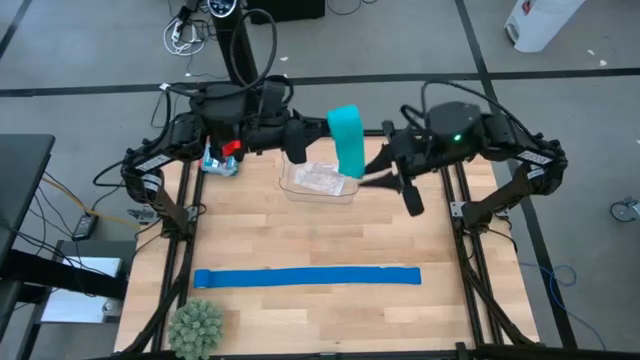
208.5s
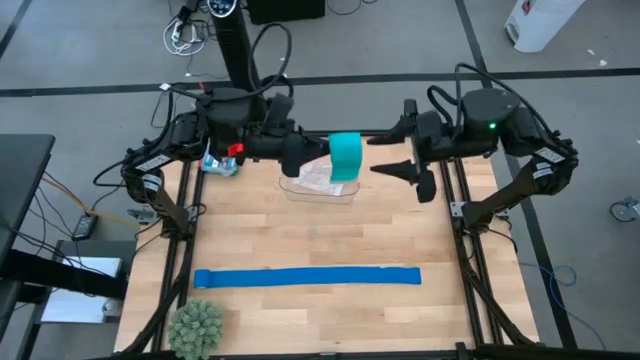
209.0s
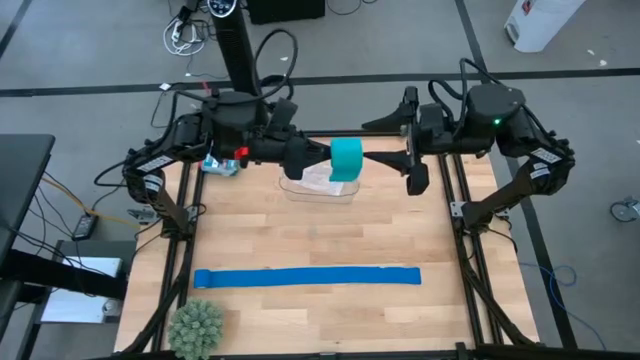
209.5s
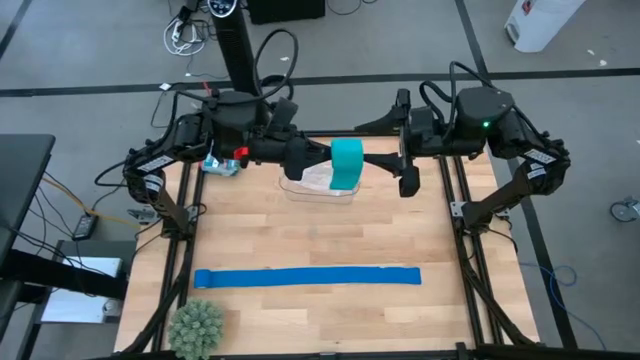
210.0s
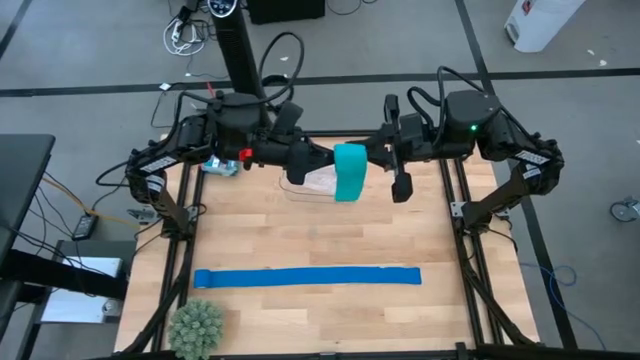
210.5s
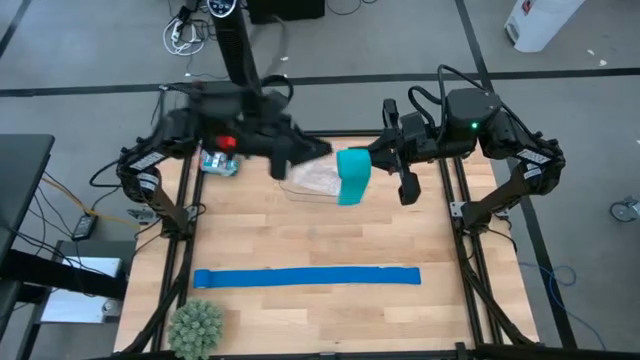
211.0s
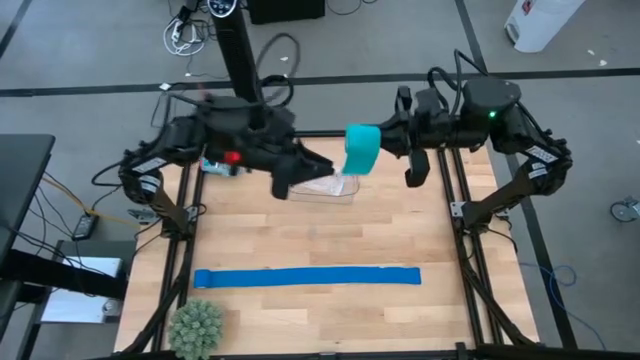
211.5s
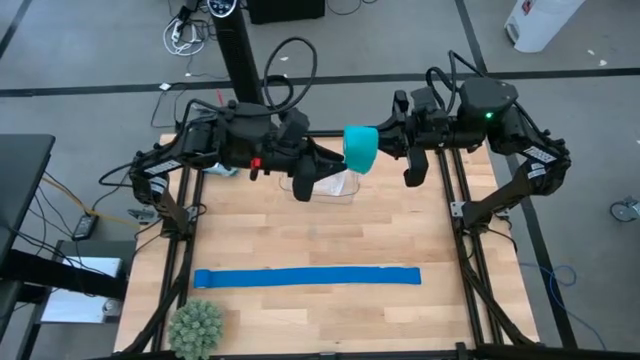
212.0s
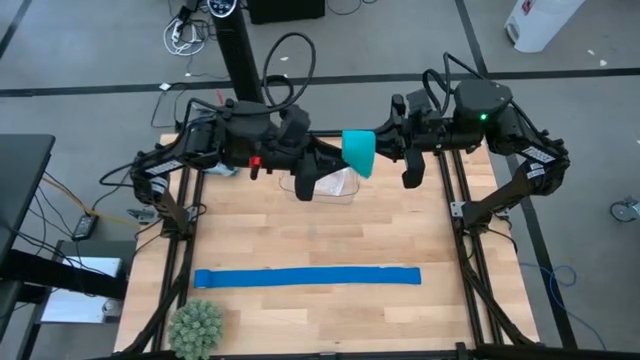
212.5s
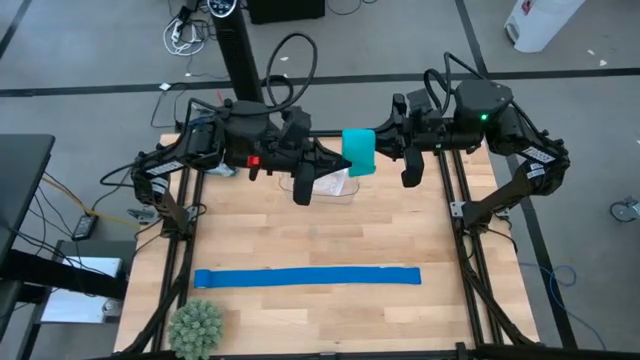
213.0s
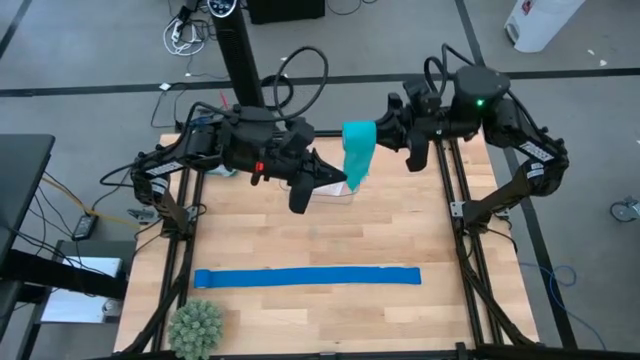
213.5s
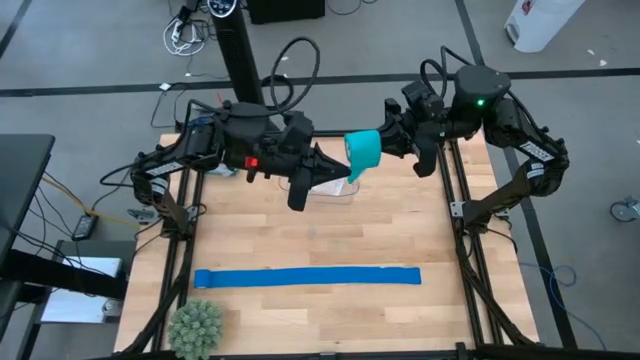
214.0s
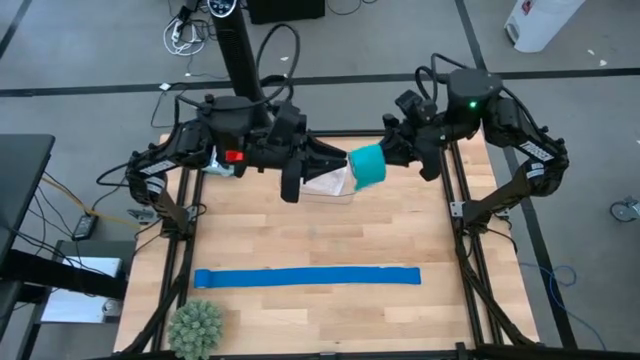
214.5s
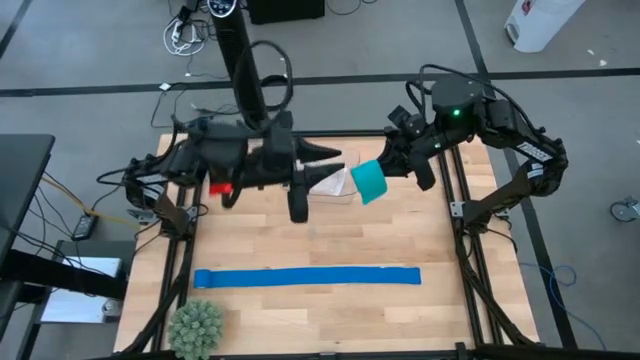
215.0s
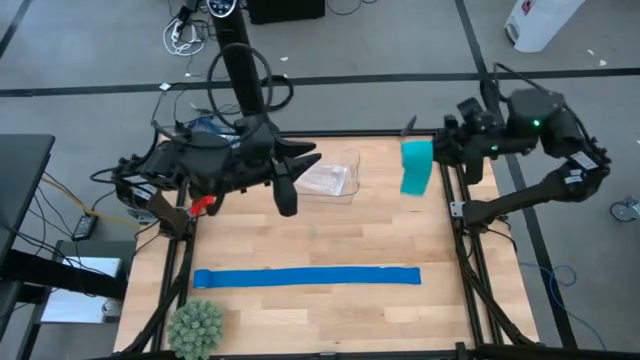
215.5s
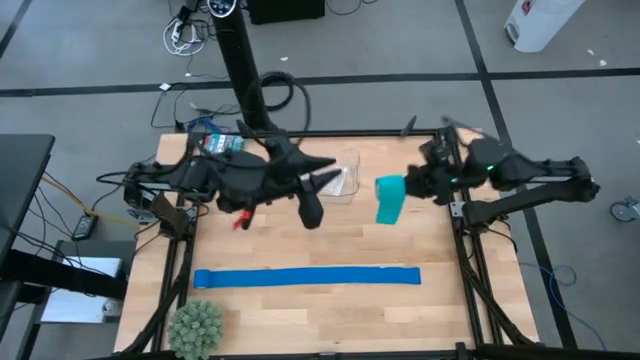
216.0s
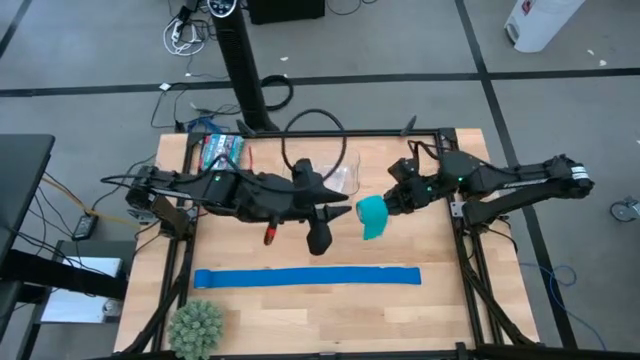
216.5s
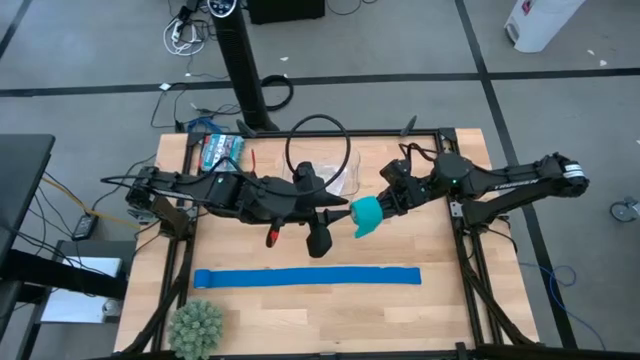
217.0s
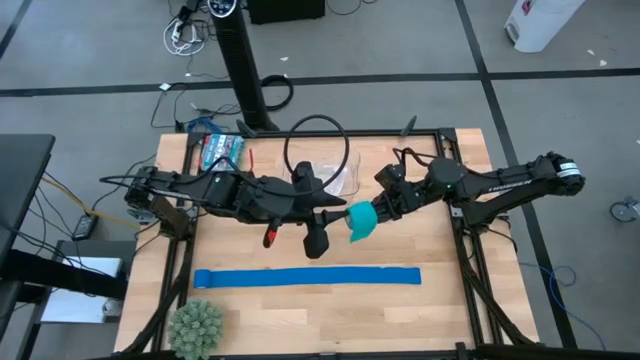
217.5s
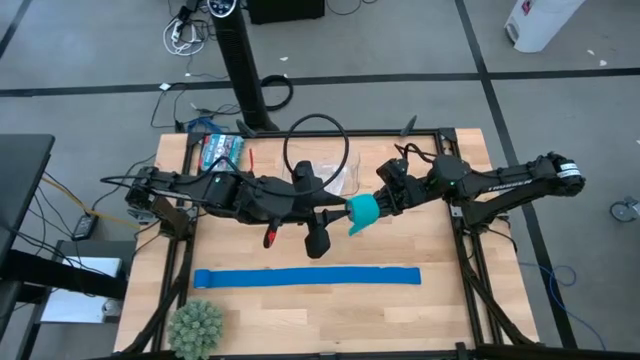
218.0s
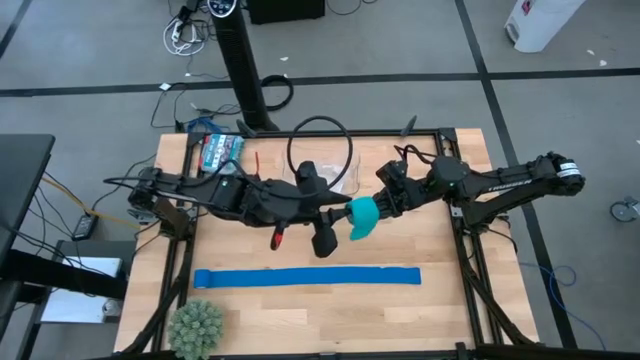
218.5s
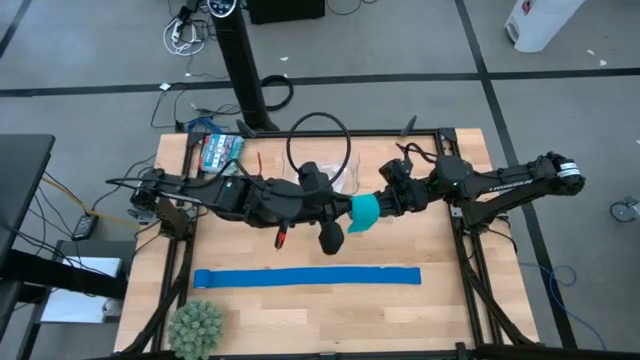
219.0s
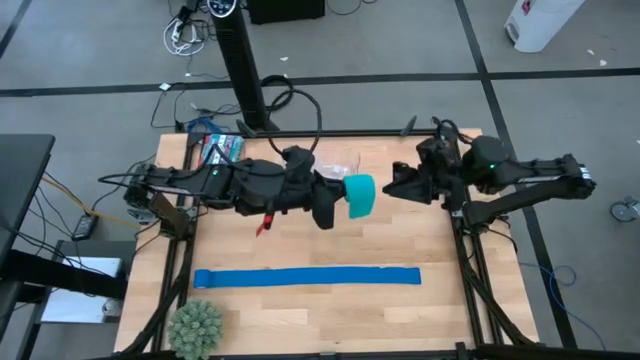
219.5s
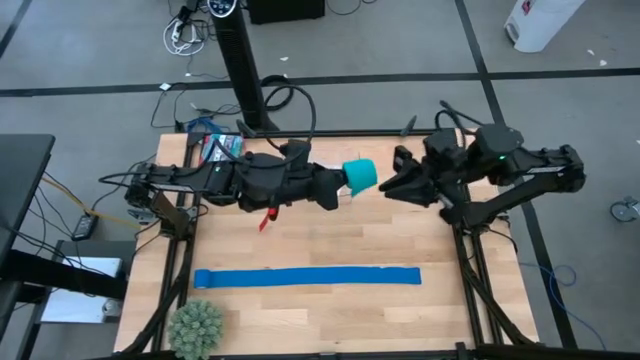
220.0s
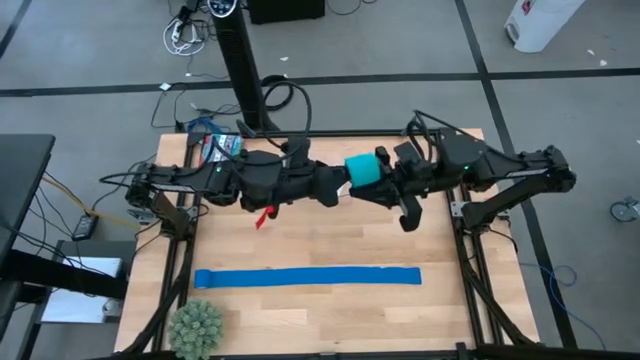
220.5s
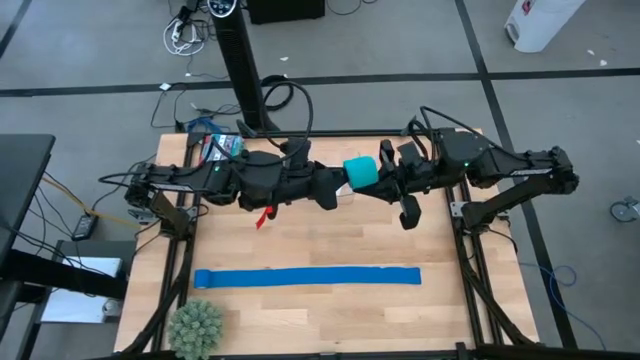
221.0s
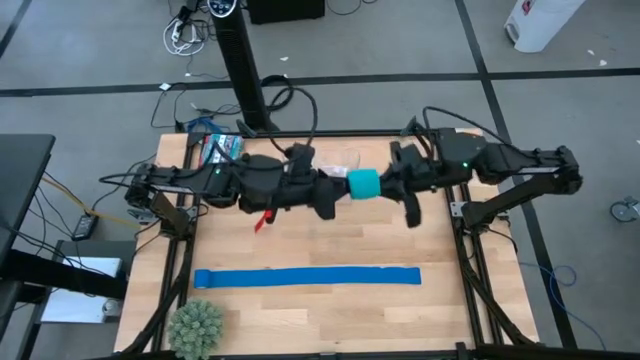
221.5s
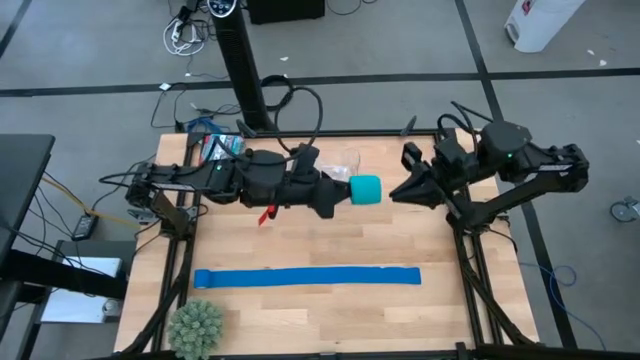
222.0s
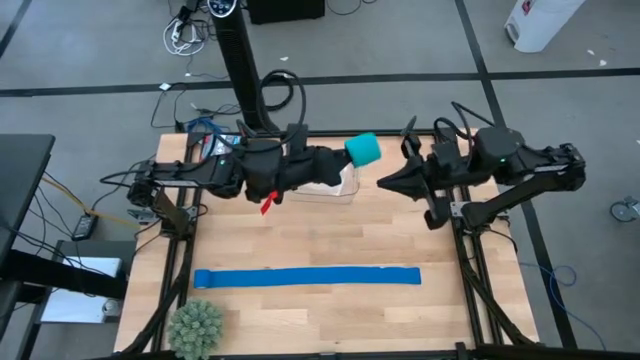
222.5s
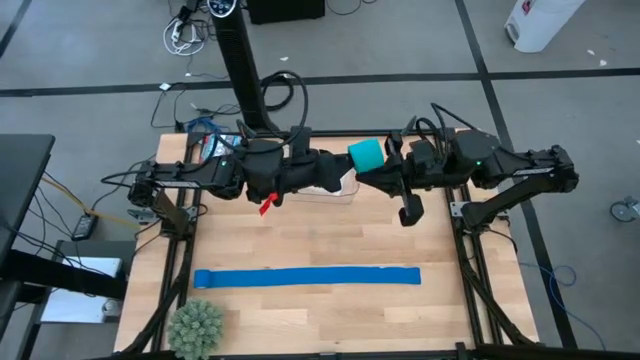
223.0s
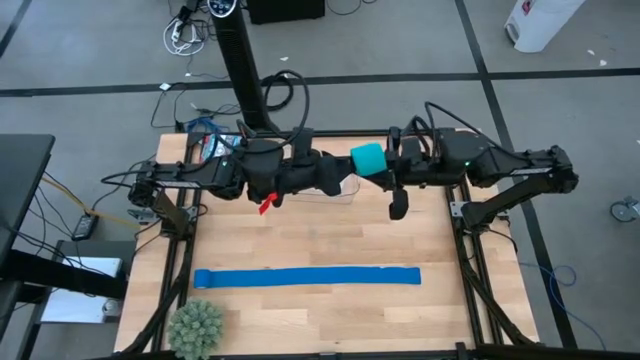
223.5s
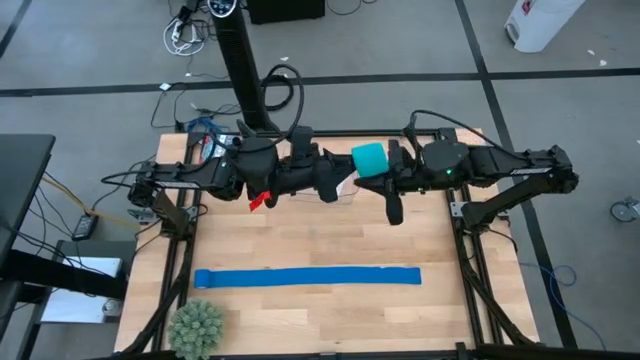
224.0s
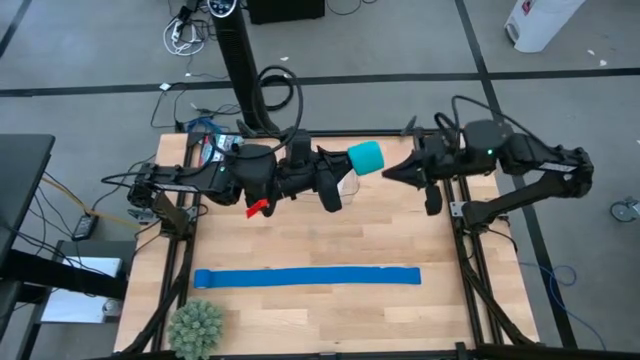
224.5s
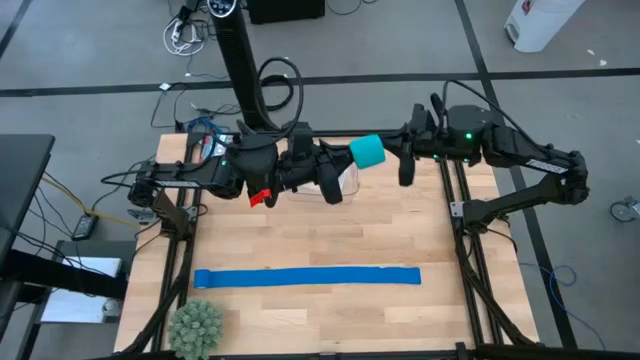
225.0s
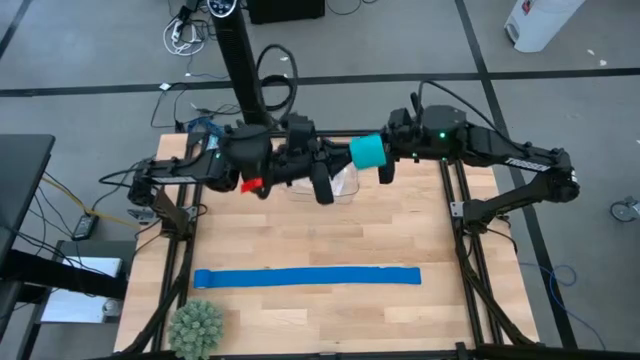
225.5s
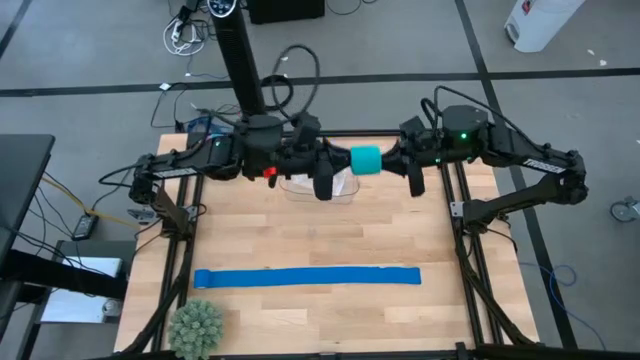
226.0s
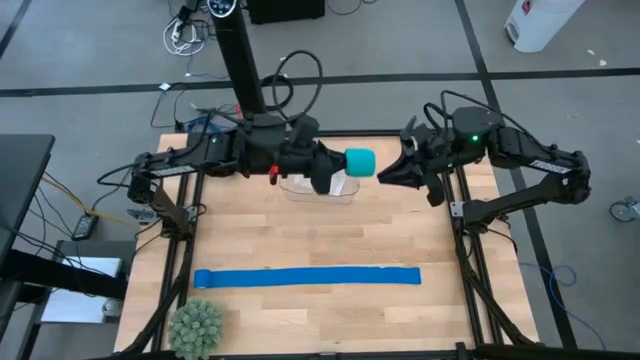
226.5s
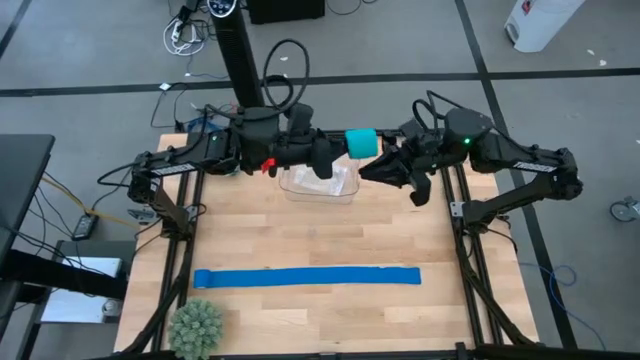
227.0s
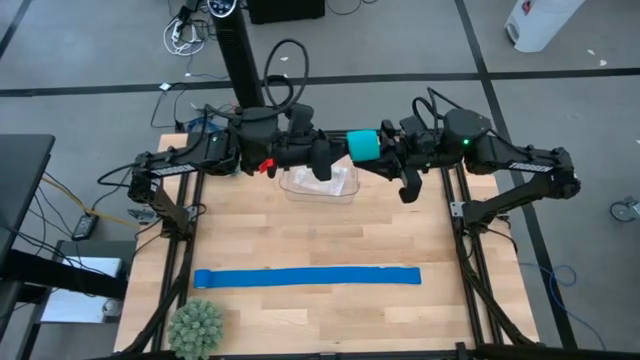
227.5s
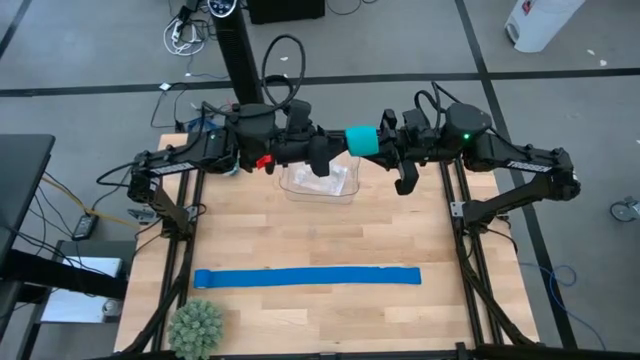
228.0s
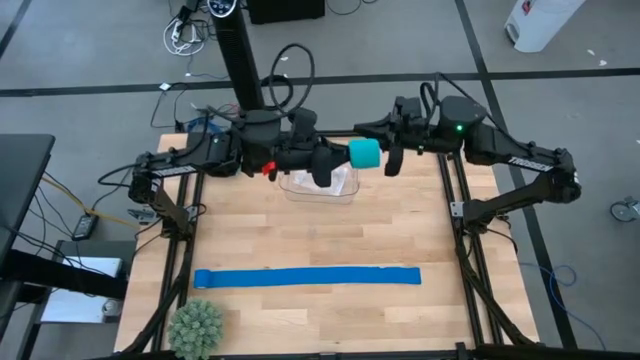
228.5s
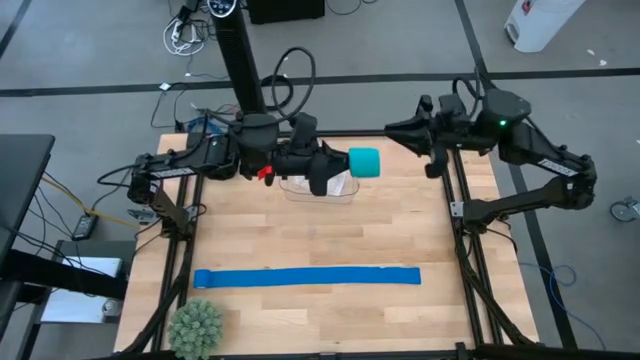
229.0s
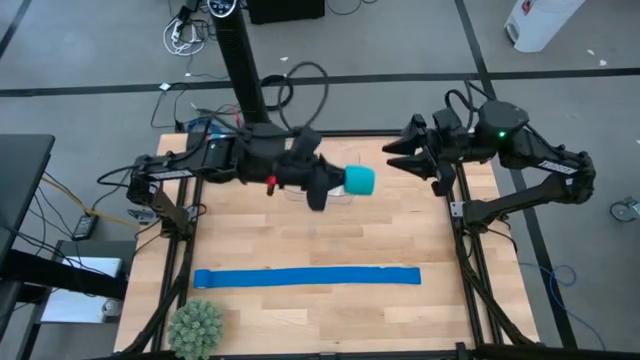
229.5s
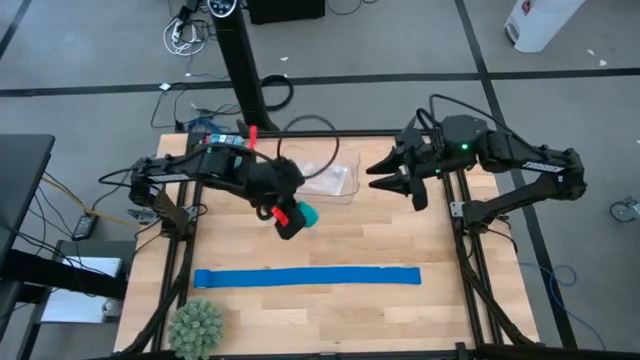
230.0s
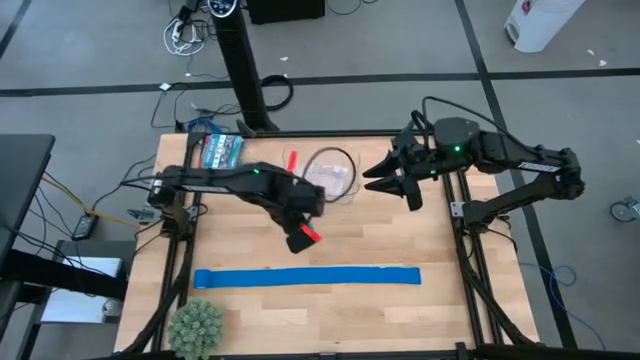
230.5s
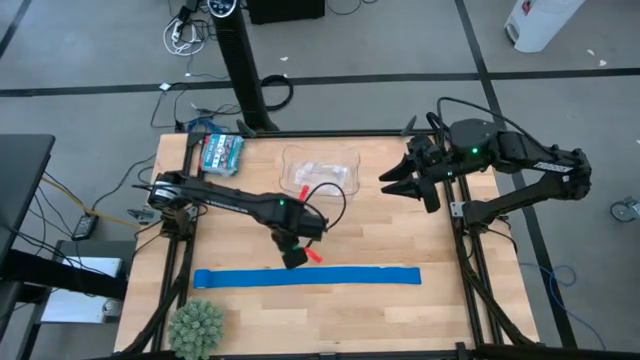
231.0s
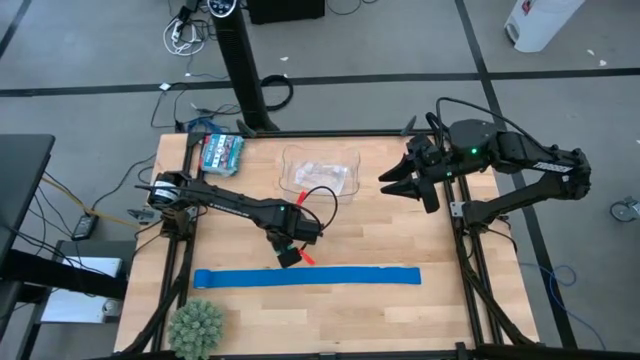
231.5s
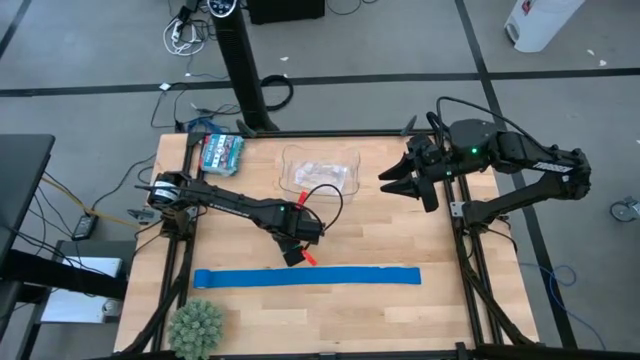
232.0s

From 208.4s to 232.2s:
Task: Roll bandage
Roll the green bandage
